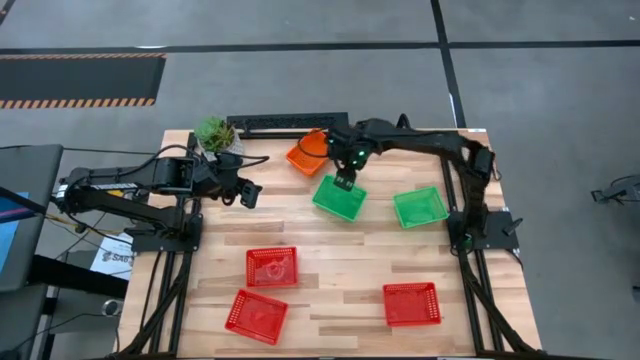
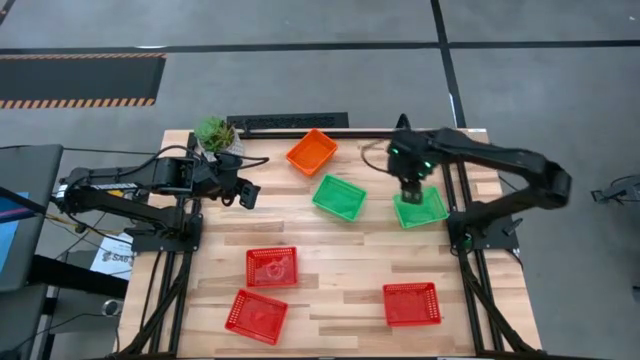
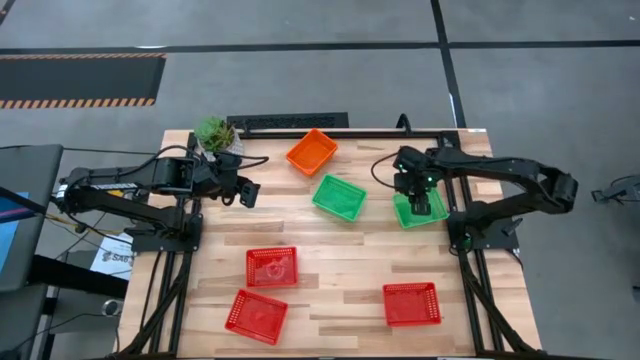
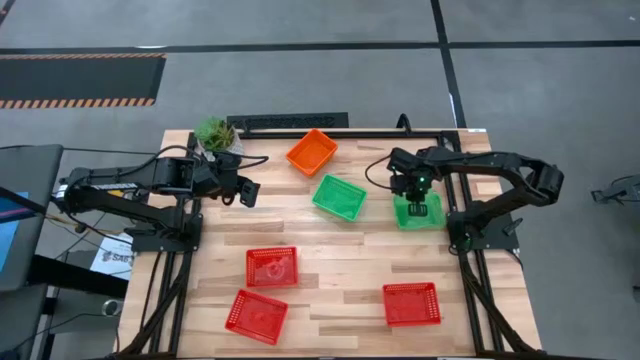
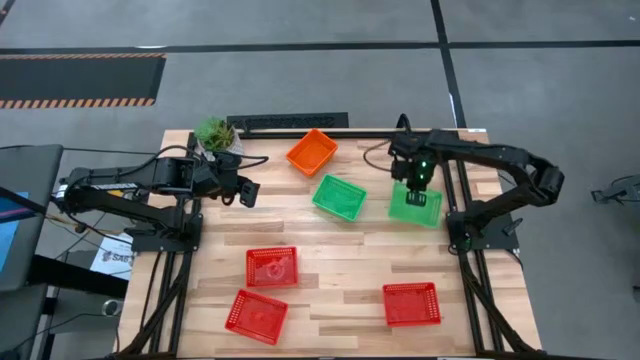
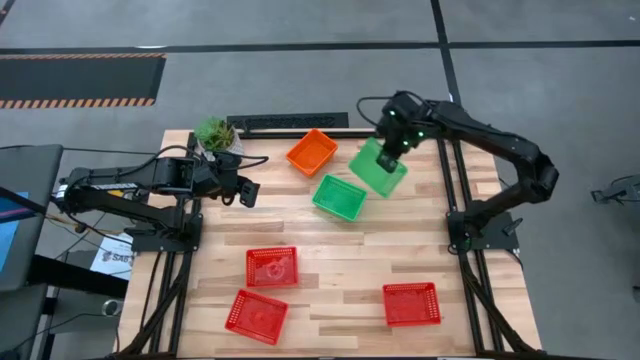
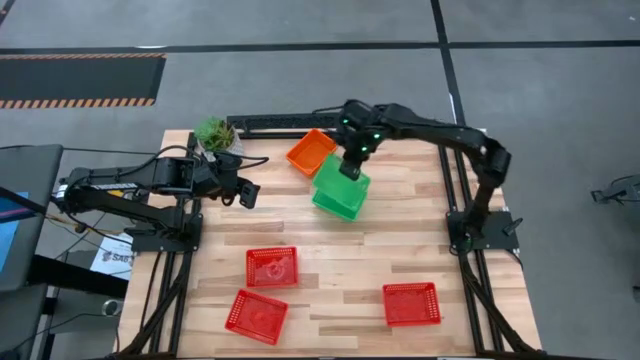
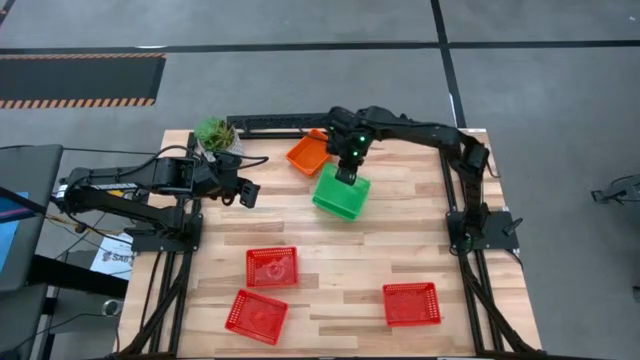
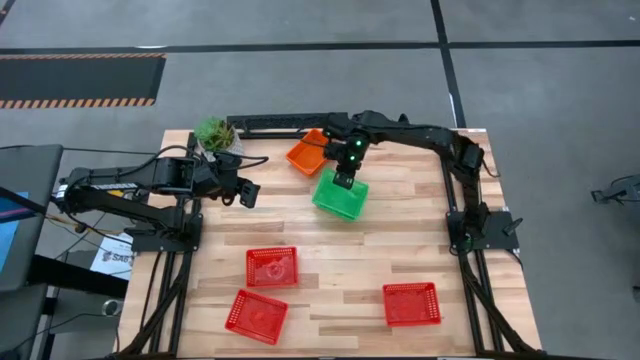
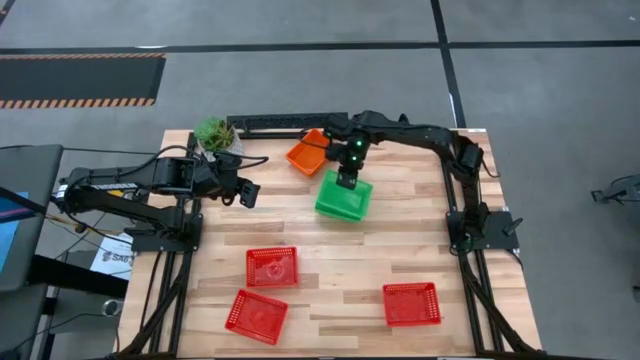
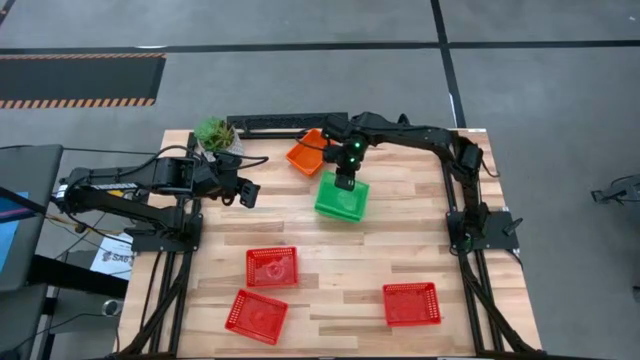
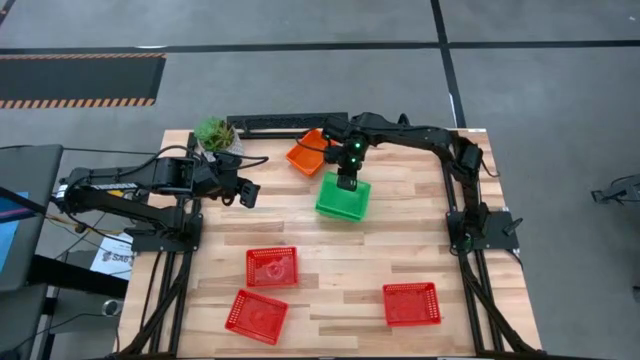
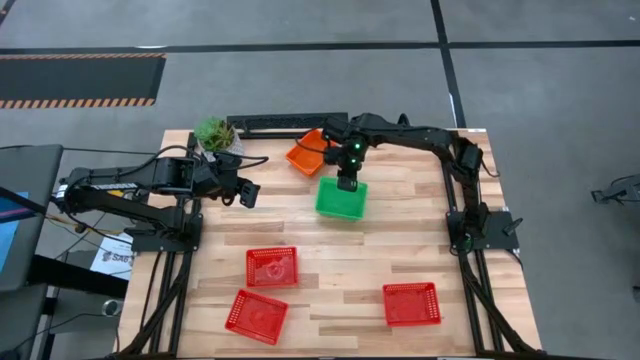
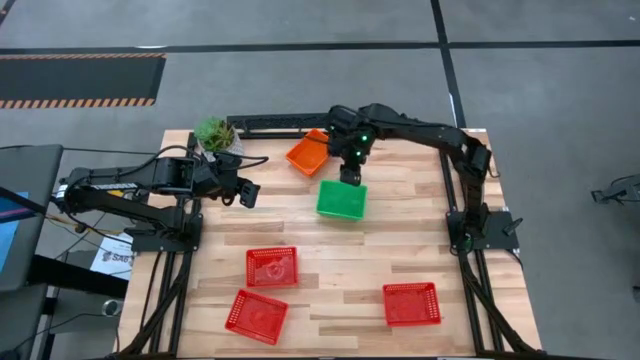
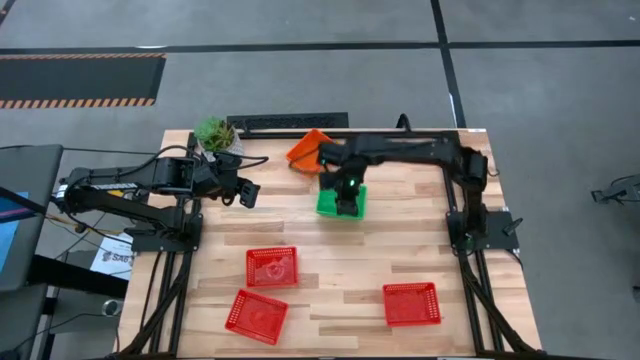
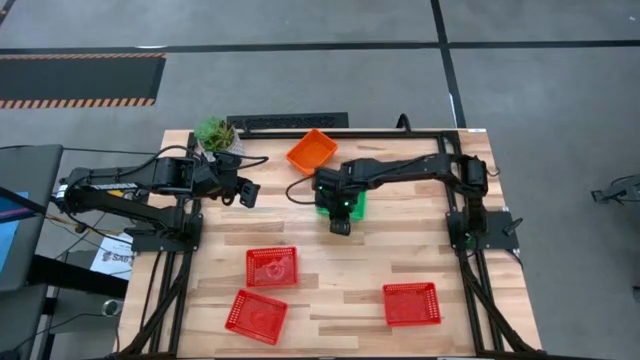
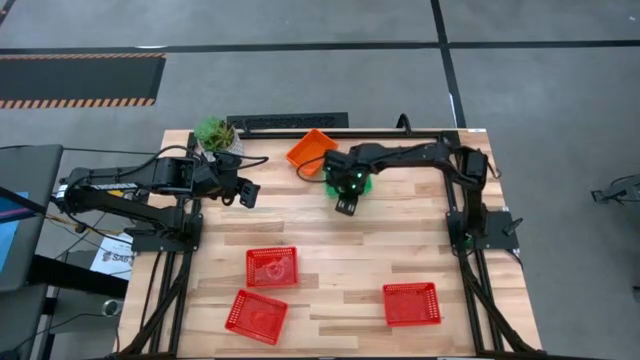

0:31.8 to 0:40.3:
Stack the top right green bin on the top left green bin

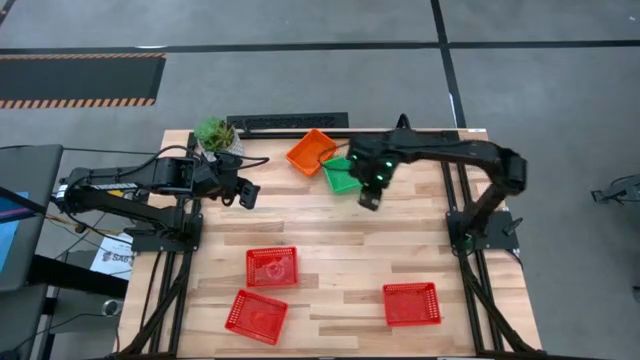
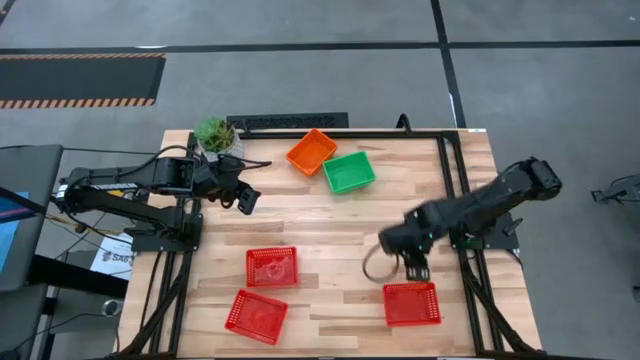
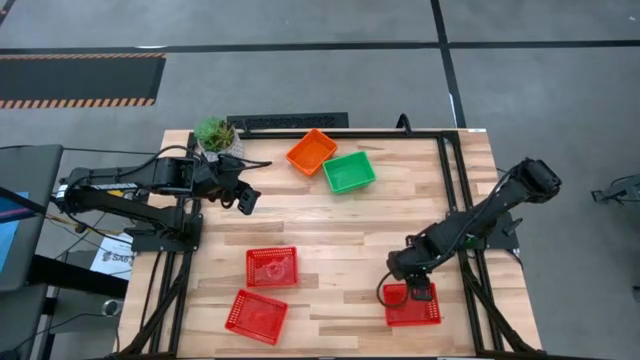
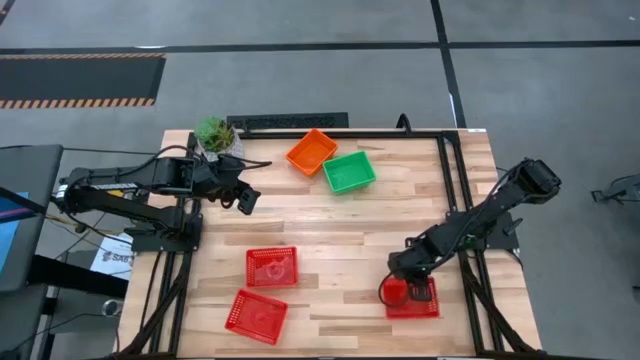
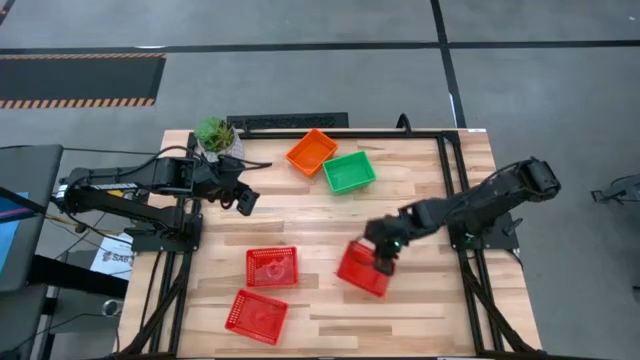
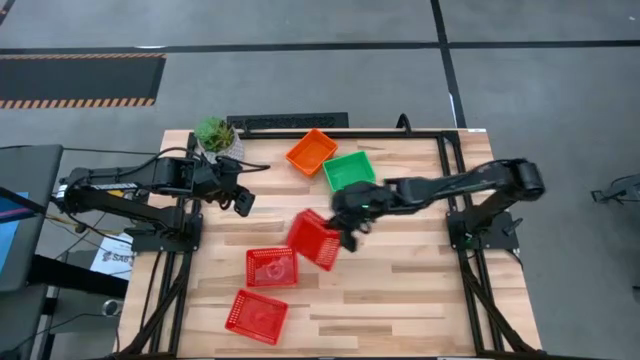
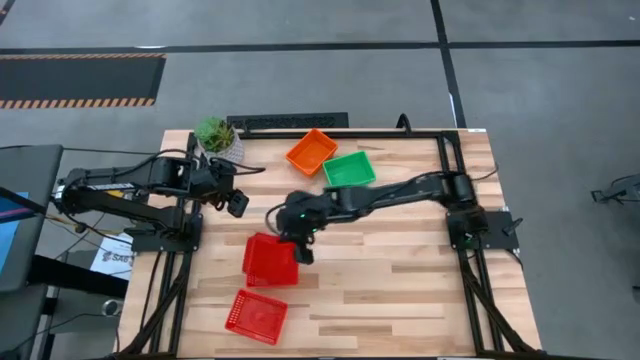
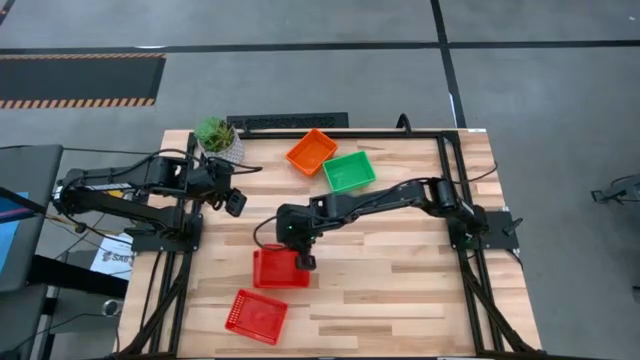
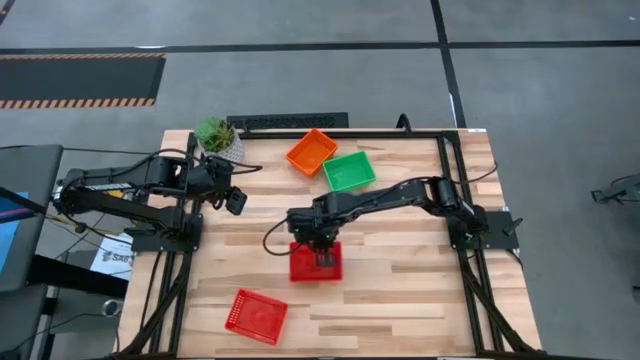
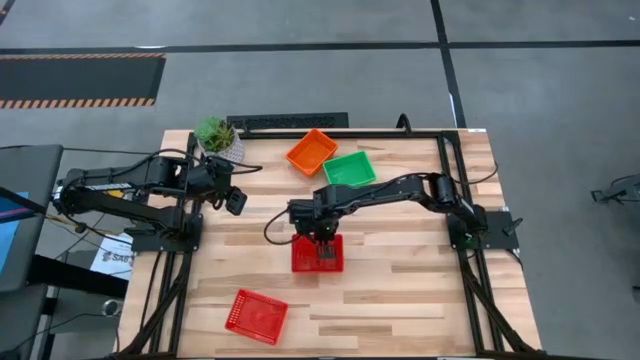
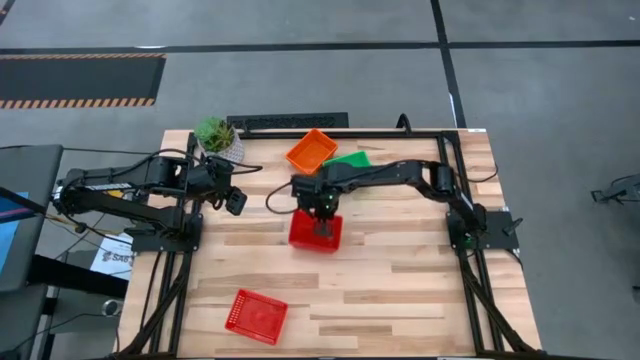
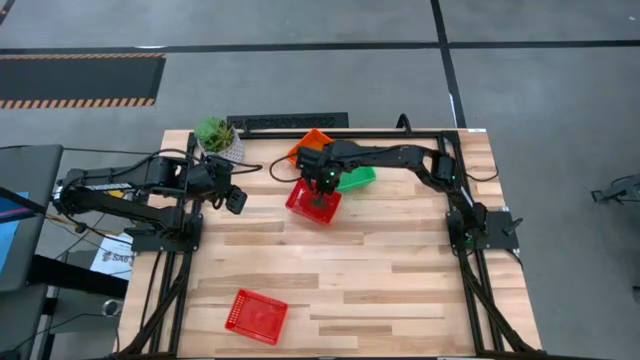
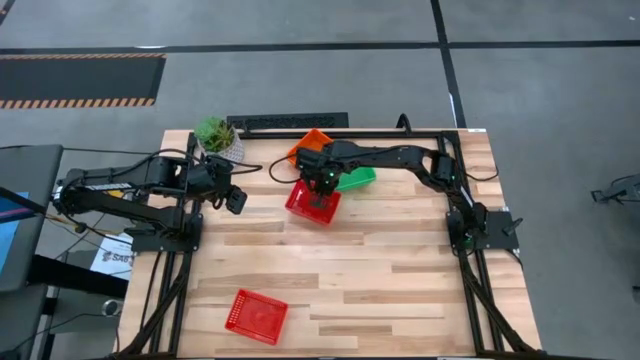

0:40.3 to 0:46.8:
Stack the right red bin on the top red bin

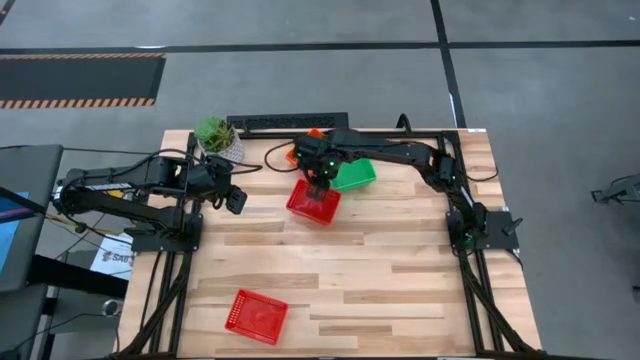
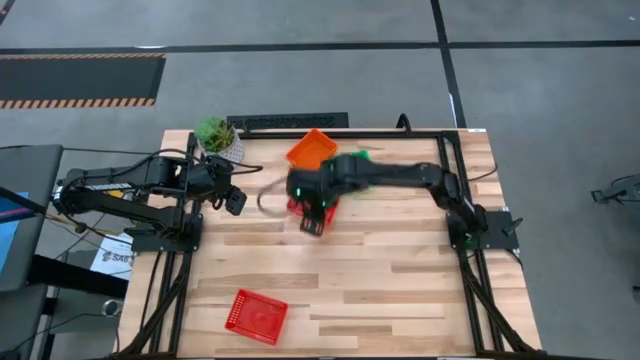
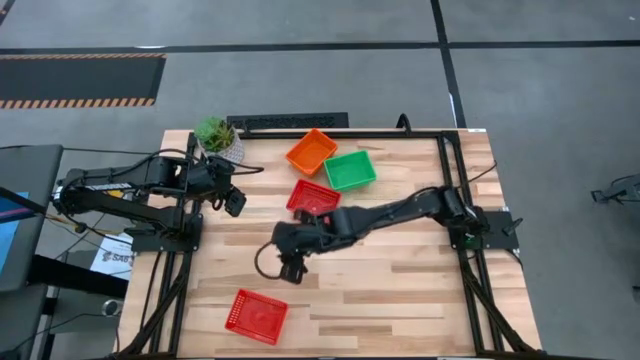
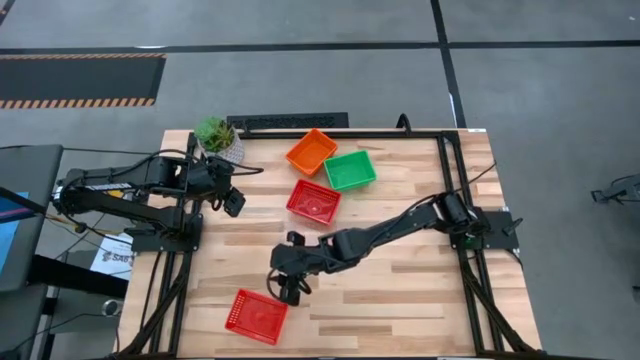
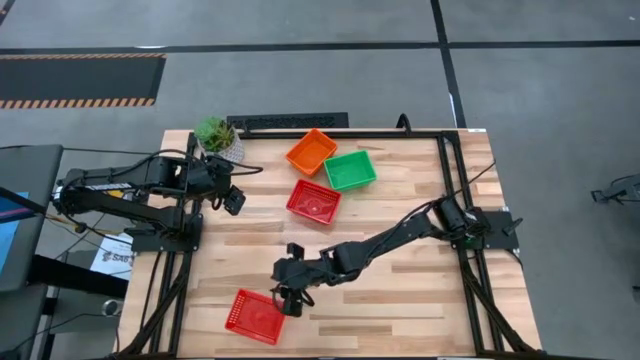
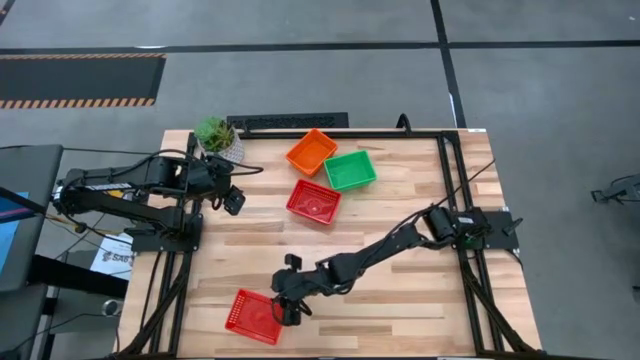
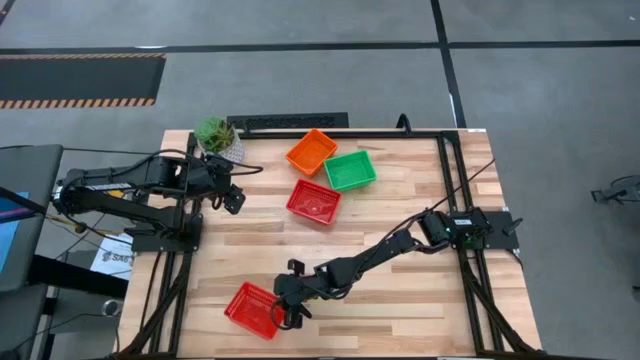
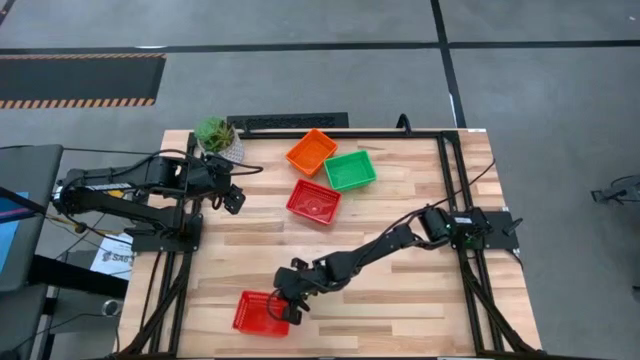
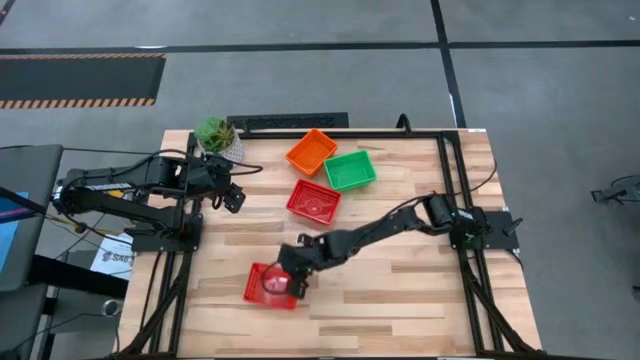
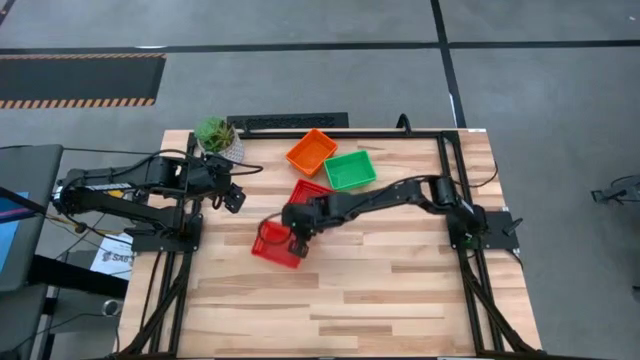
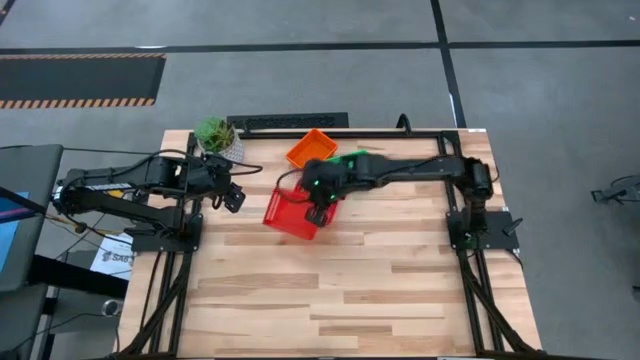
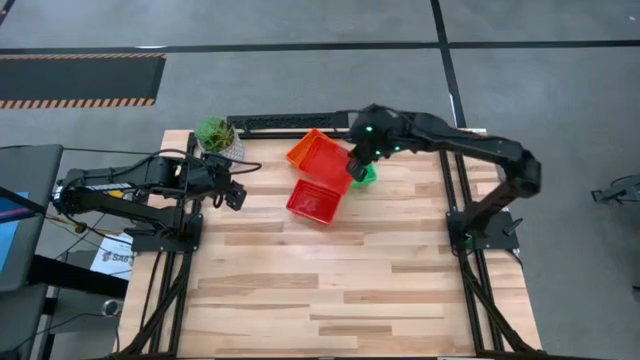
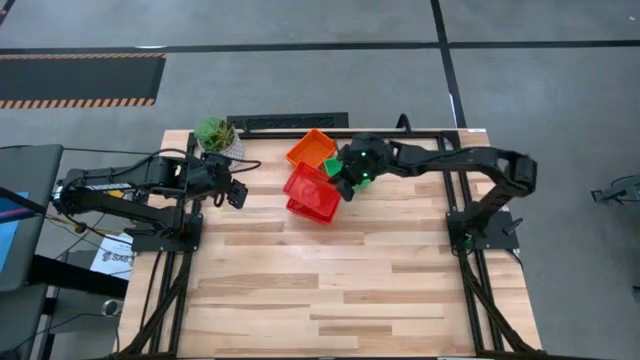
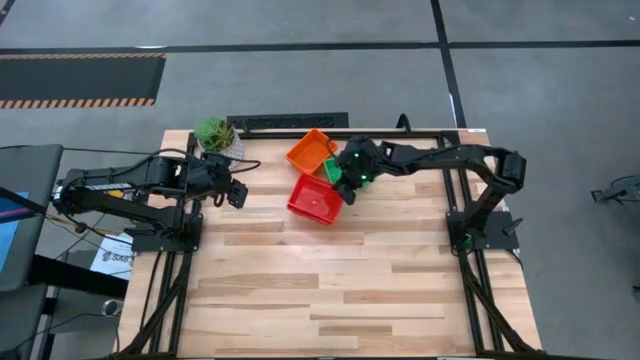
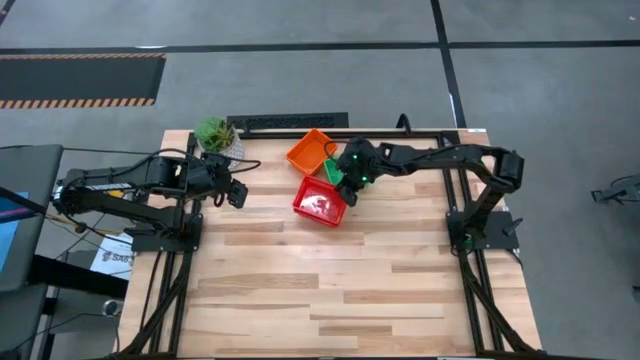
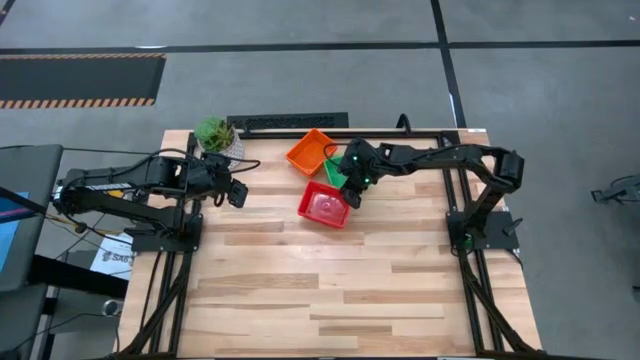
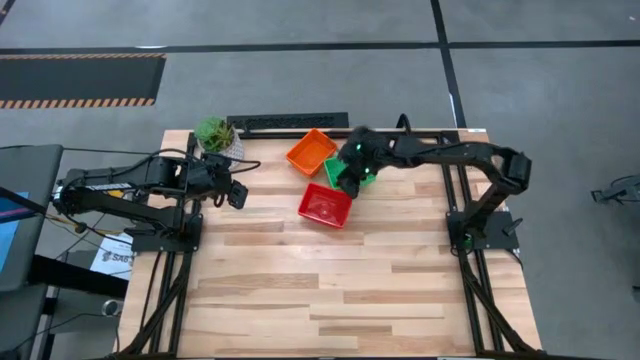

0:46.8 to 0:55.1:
Stack the bottom red bin on the top red bin
